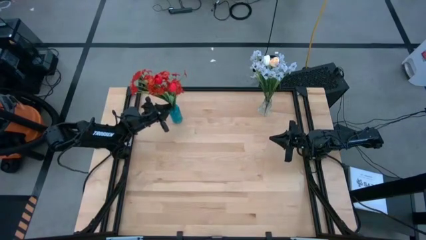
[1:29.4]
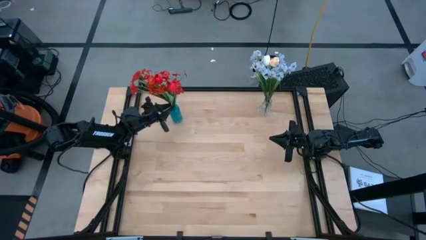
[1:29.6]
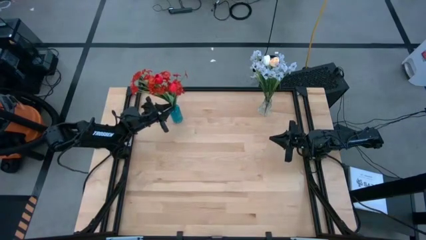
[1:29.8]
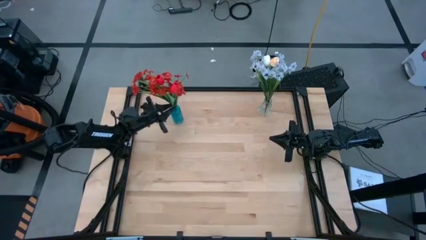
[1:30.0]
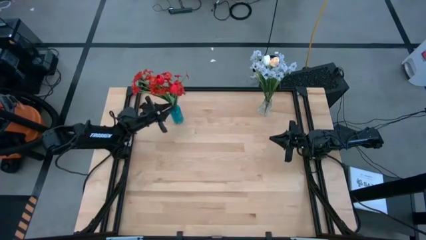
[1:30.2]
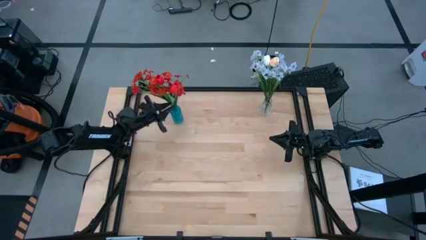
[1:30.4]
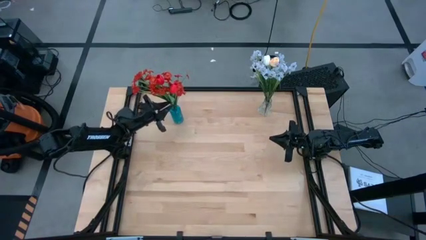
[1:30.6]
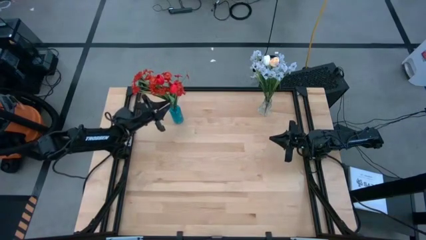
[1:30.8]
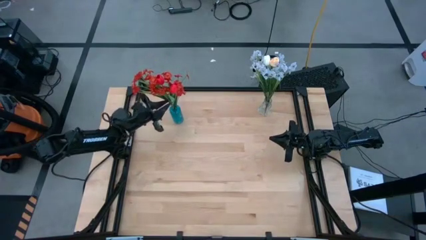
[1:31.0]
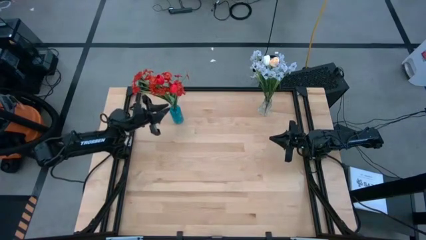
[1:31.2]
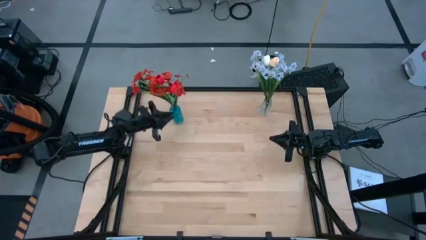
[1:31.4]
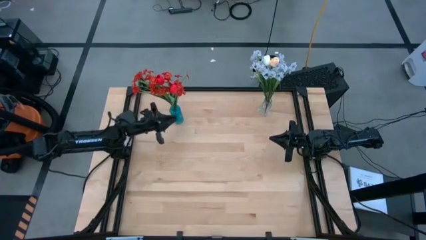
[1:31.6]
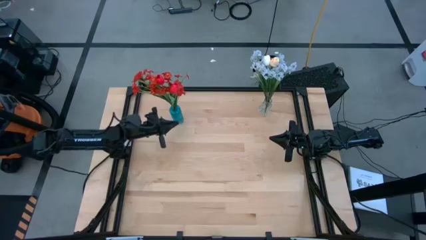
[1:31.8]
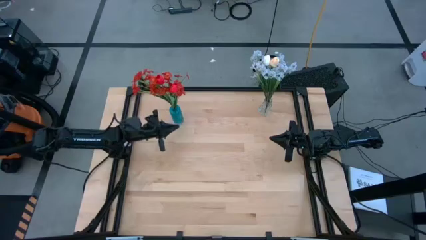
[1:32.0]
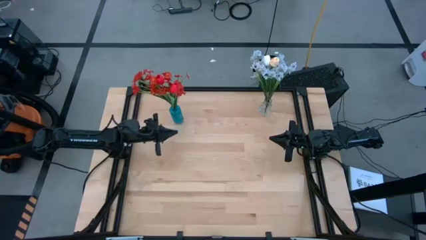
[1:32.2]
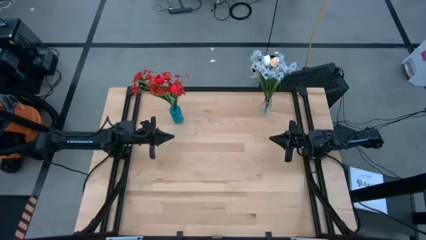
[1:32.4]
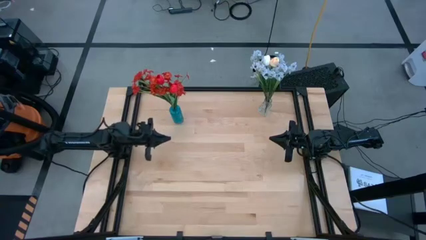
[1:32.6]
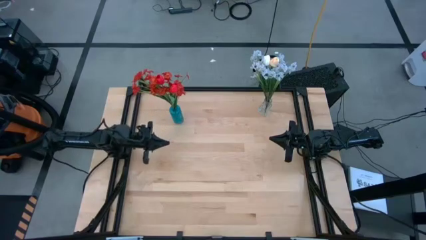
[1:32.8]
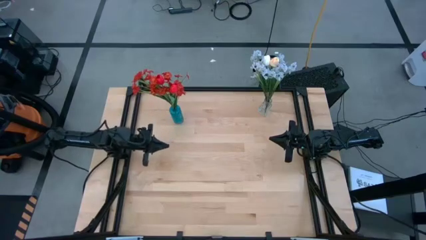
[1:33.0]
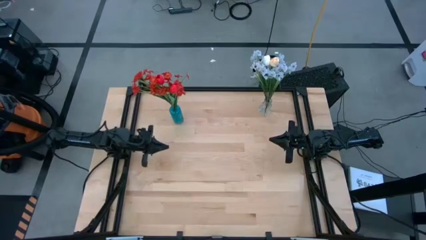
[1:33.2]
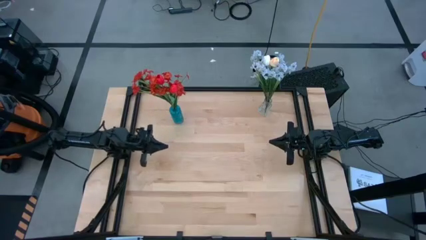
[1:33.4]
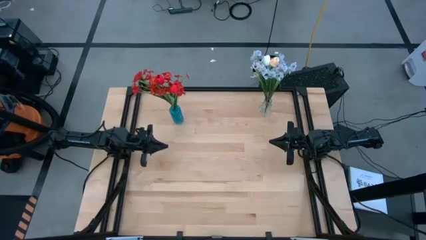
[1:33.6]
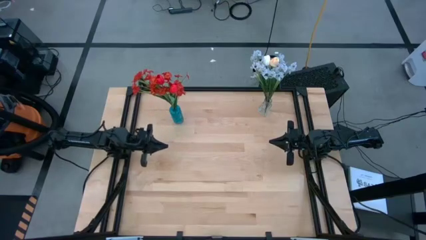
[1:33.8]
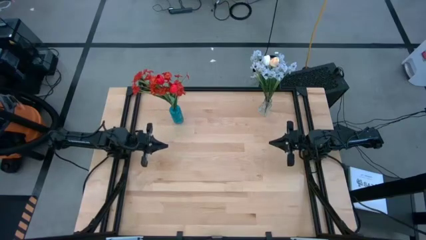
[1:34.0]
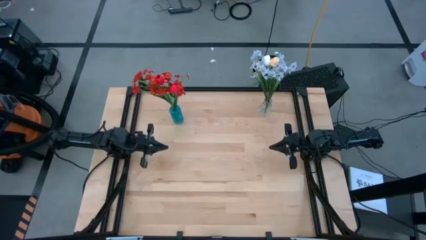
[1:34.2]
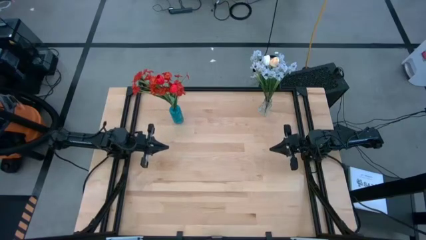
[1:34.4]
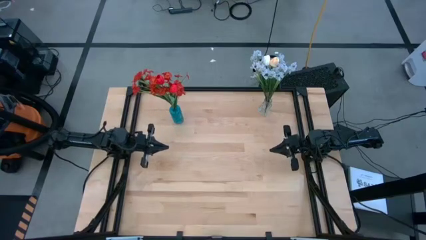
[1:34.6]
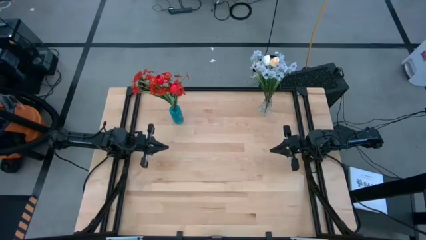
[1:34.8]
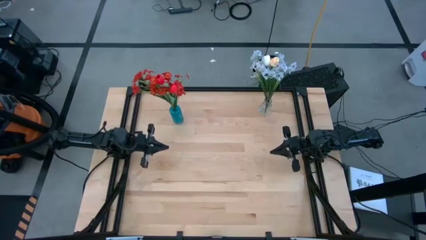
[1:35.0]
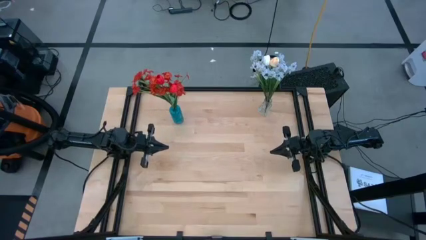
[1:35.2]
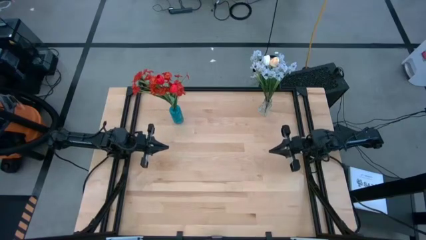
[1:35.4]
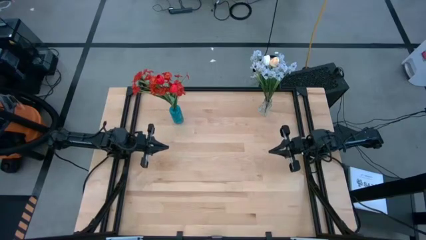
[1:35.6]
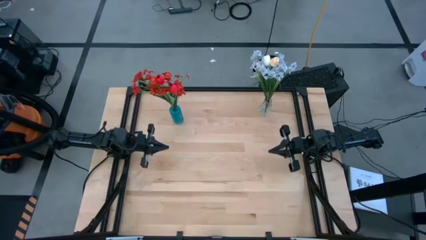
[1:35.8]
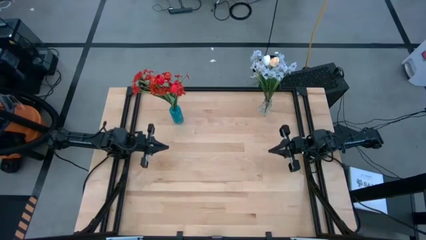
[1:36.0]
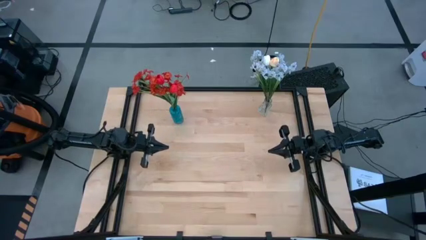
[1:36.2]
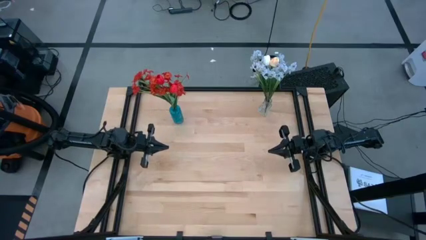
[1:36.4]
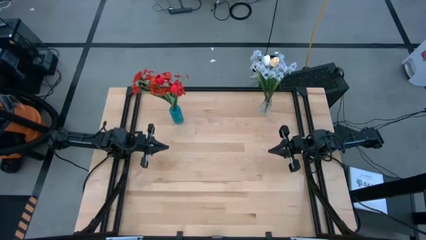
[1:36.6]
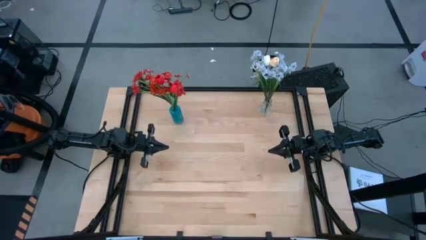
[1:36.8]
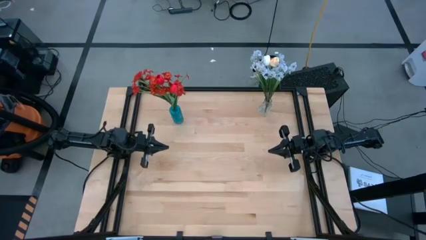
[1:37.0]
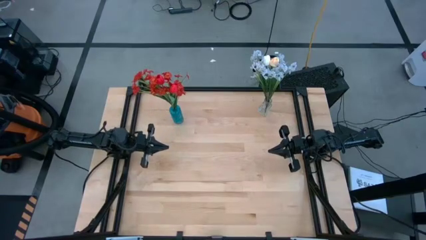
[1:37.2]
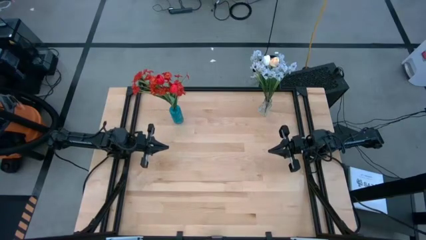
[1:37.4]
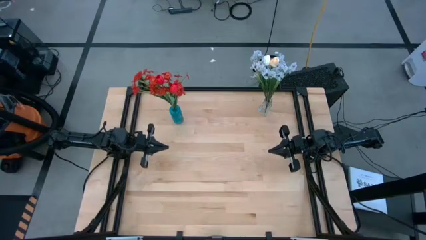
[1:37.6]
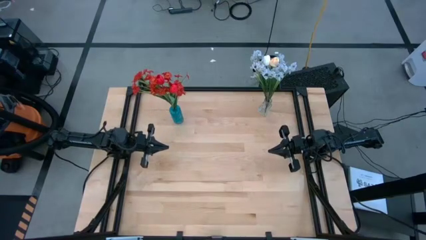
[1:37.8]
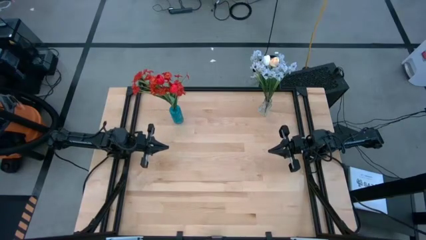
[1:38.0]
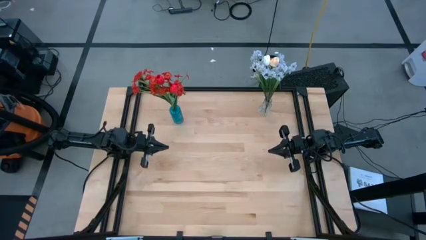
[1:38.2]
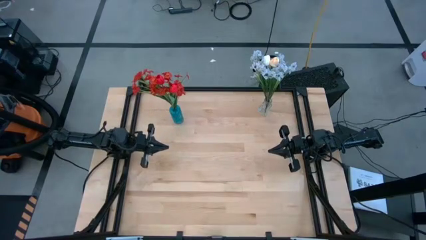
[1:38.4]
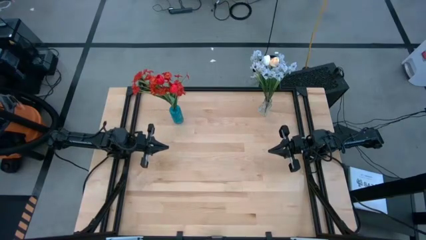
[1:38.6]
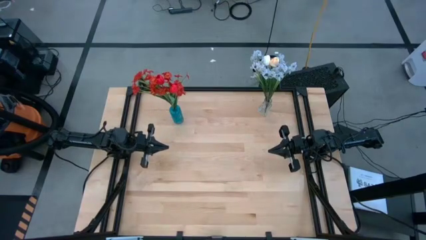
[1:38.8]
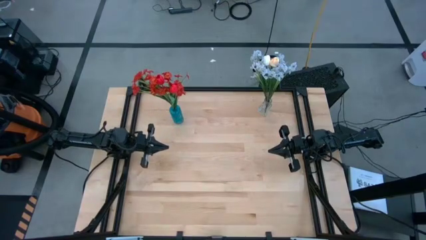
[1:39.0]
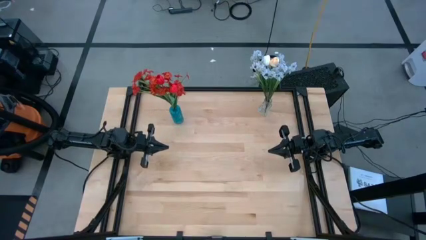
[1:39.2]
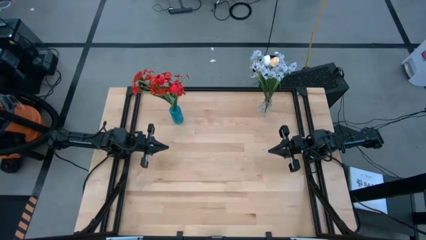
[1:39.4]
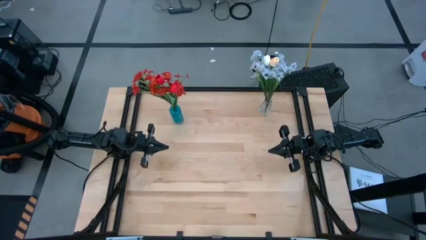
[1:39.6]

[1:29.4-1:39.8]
Task: Sort flowers into vase by color
Return to Home Position
